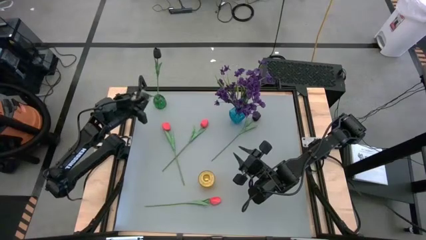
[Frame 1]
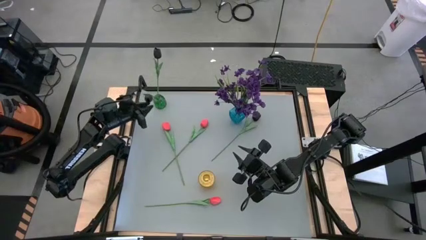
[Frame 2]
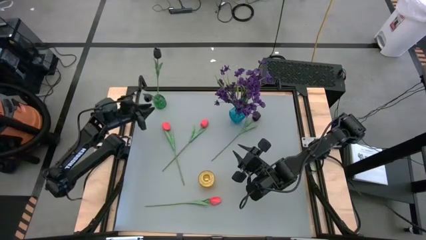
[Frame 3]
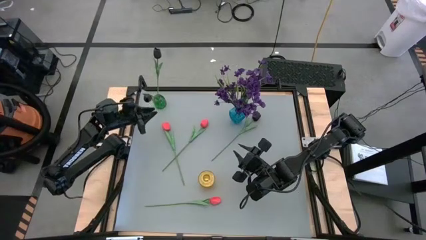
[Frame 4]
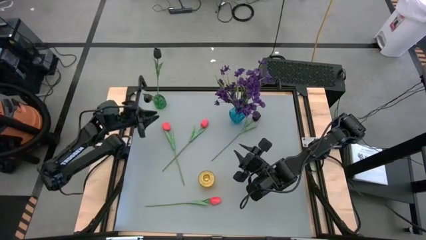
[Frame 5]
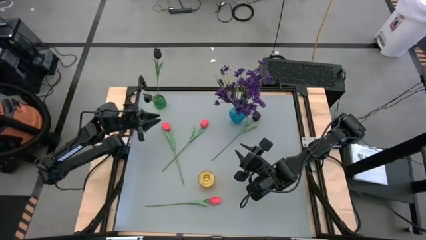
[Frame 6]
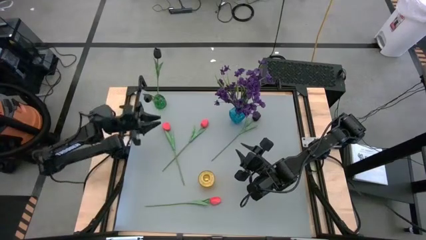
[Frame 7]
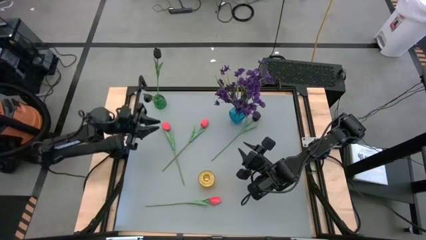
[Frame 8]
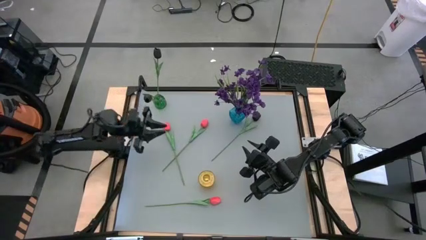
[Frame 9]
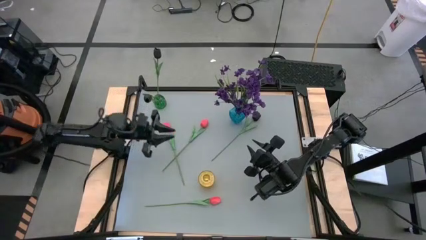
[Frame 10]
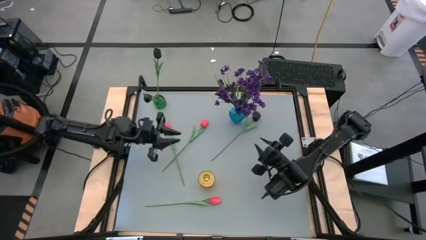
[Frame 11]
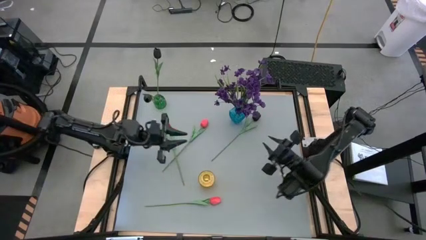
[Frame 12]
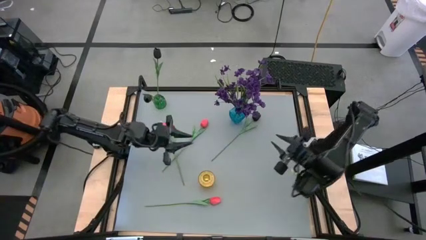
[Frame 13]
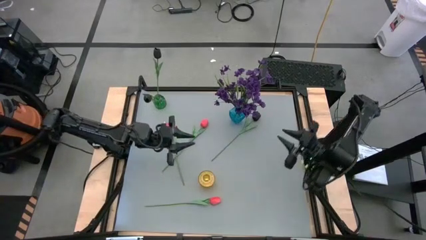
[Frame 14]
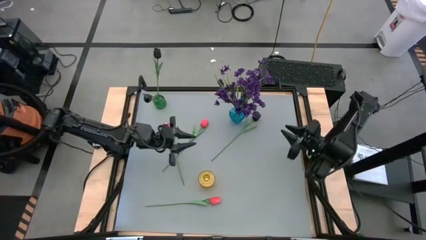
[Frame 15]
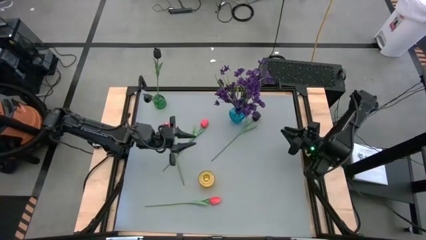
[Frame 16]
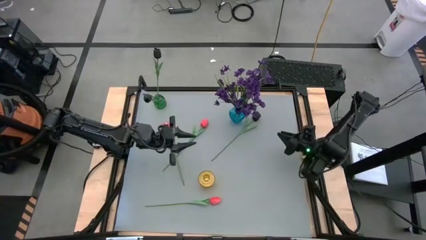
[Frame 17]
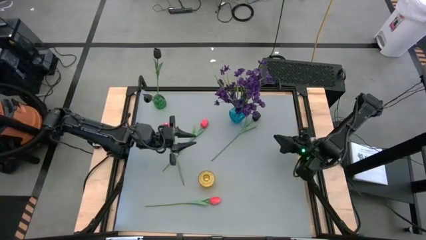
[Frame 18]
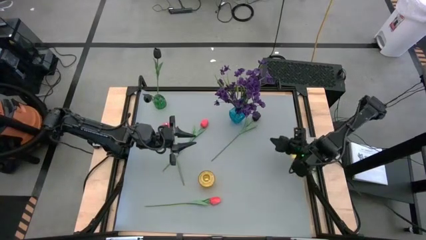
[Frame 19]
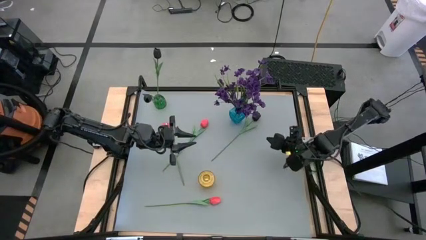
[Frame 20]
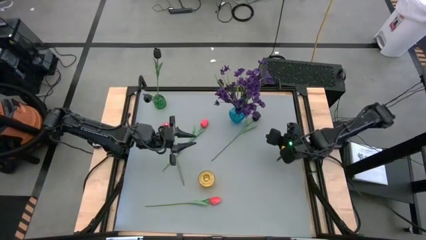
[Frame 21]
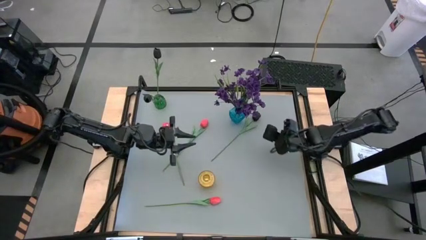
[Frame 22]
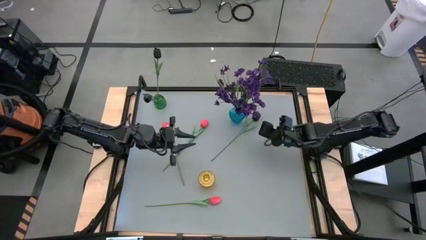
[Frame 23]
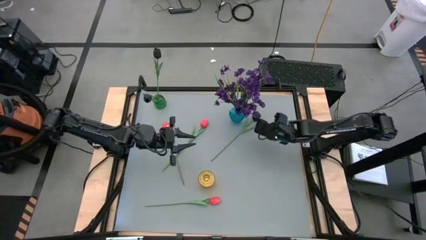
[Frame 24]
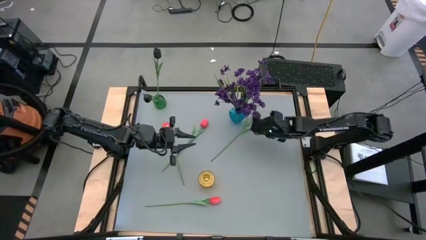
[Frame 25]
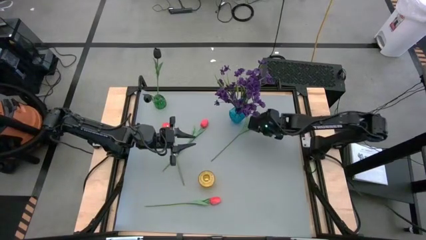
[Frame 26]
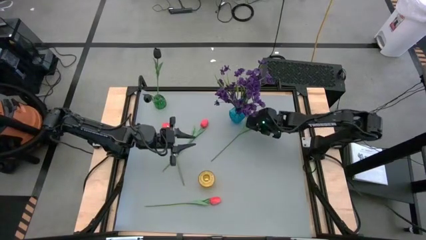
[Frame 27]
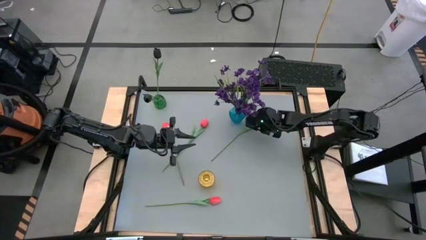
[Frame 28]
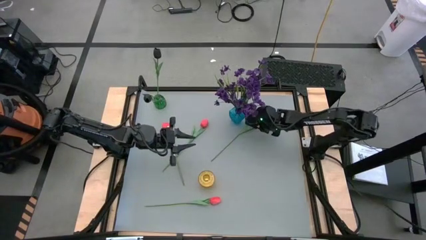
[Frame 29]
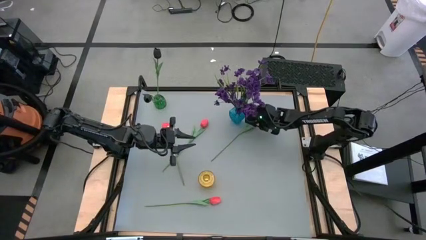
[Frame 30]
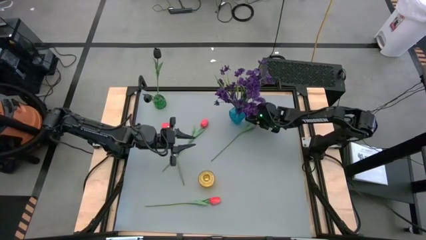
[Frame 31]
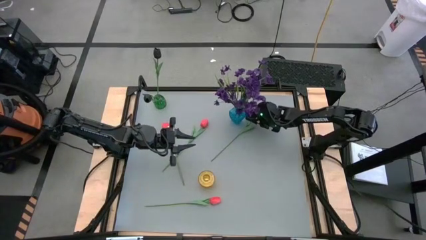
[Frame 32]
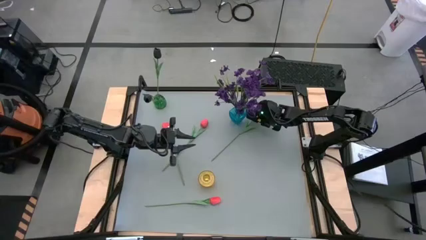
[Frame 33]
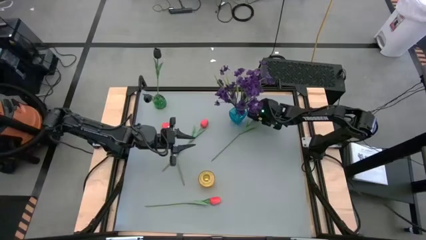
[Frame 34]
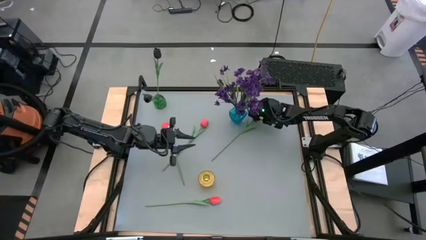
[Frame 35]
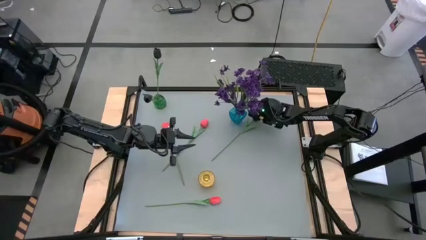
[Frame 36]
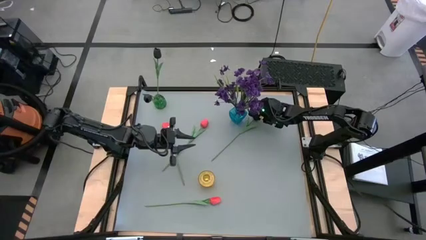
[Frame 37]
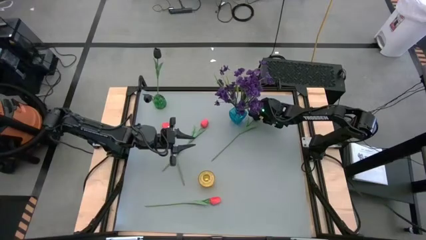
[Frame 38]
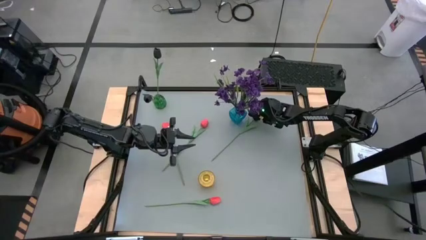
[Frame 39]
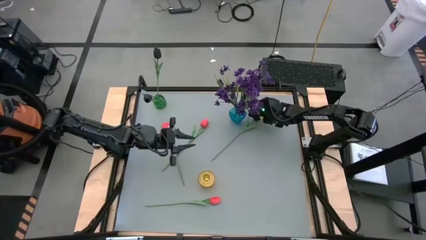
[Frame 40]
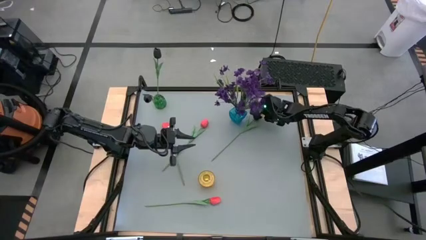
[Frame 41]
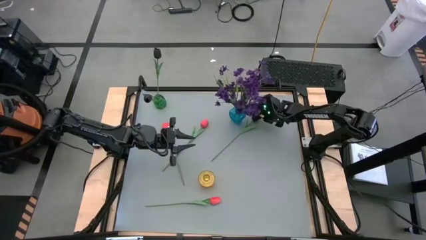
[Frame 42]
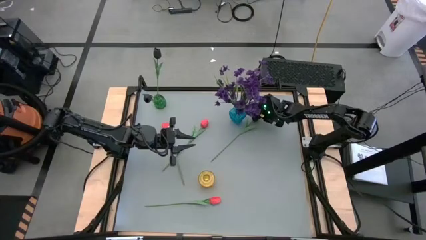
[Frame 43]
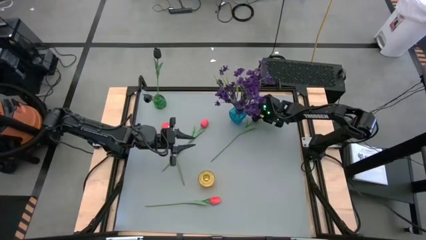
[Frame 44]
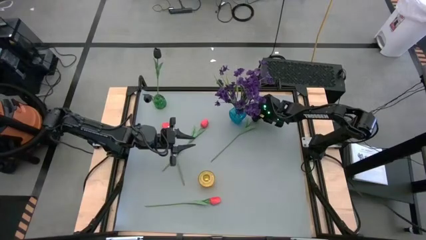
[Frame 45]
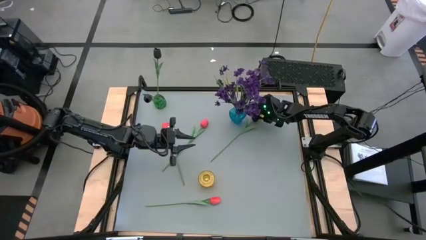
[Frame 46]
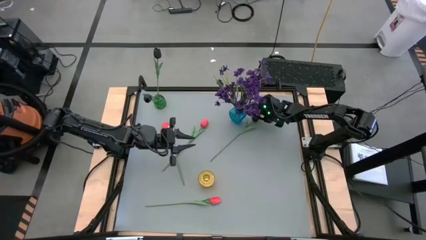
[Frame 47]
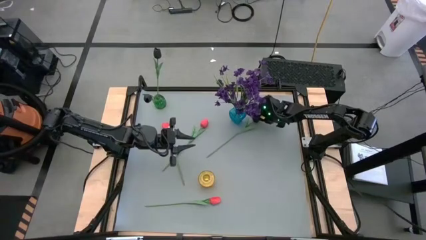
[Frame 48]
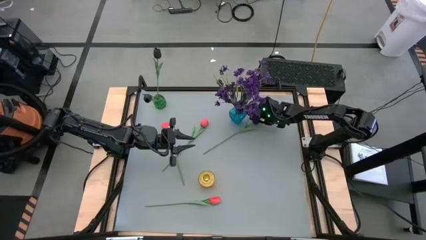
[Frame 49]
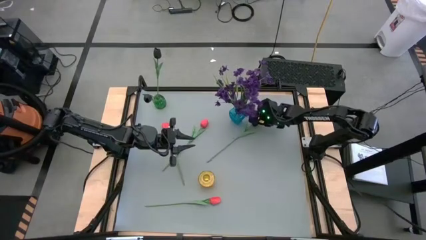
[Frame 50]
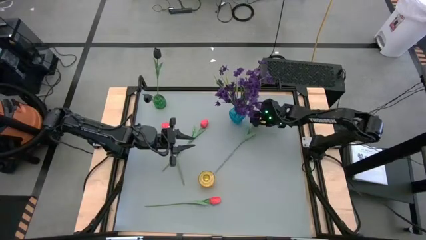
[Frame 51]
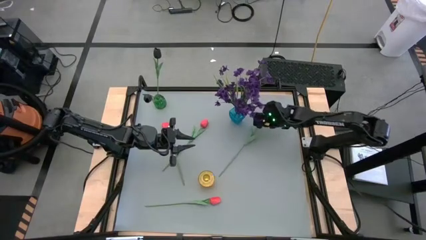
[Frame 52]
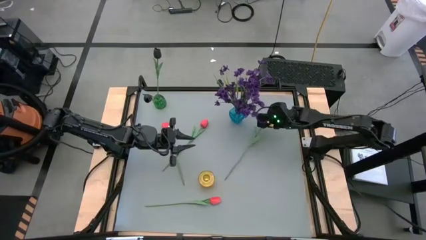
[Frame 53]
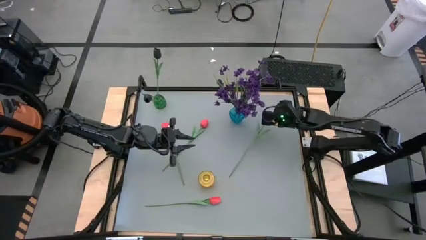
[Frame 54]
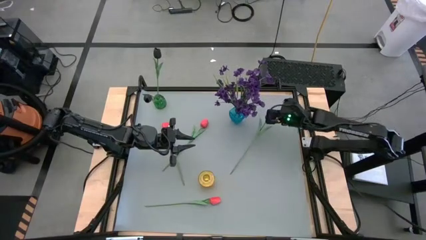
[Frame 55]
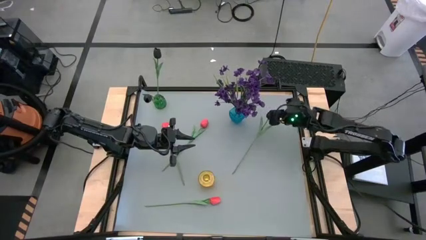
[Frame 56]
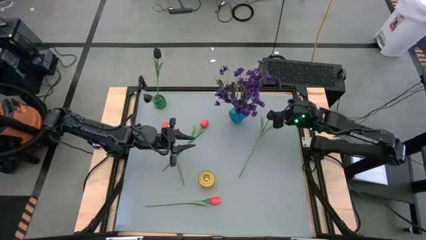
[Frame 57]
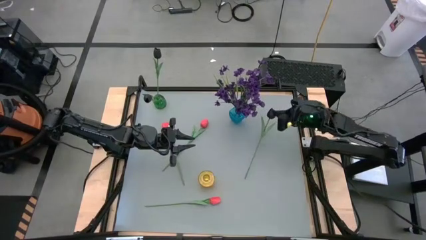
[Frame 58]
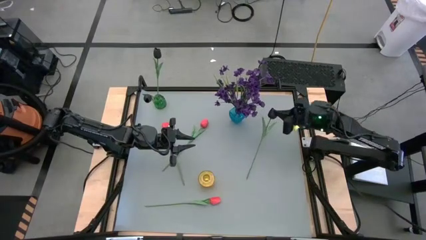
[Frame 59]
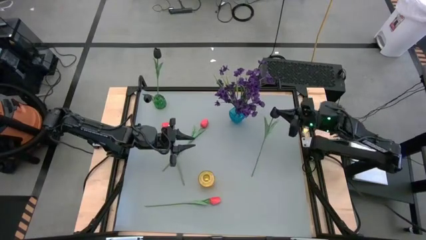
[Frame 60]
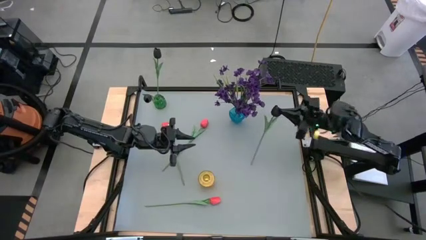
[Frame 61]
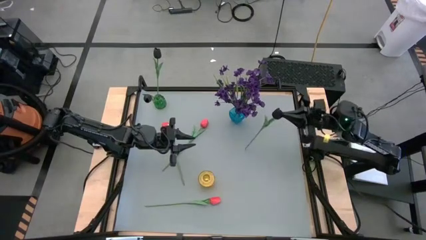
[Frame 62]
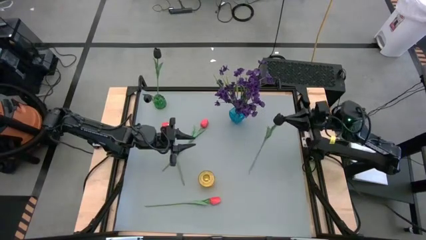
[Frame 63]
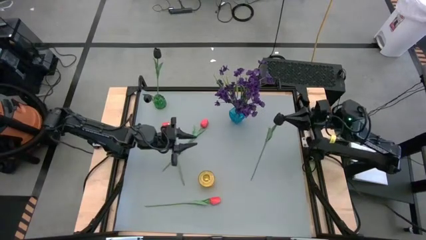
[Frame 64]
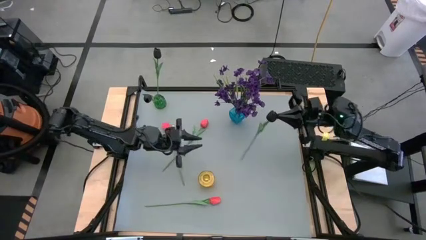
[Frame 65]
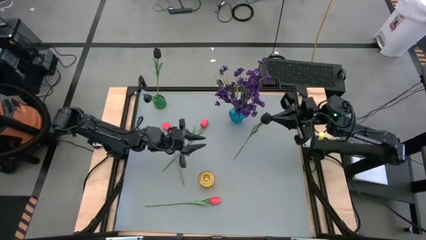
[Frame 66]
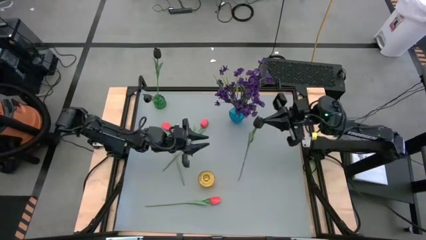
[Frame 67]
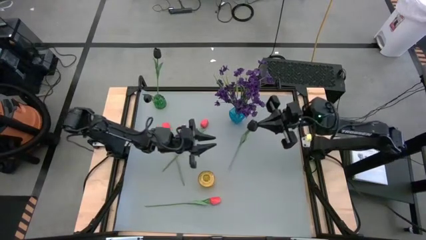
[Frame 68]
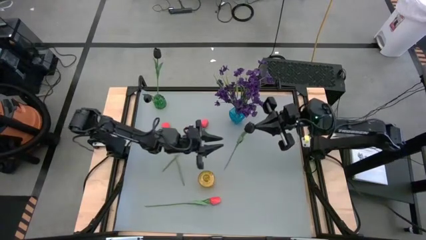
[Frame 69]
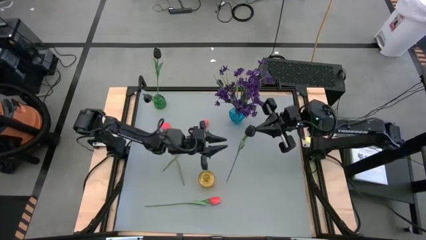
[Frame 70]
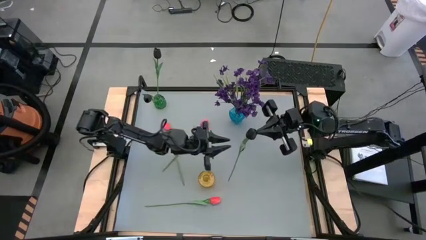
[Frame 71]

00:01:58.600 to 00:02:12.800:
Task: Sort flowers into vase by color
Put the black flower into the green vase

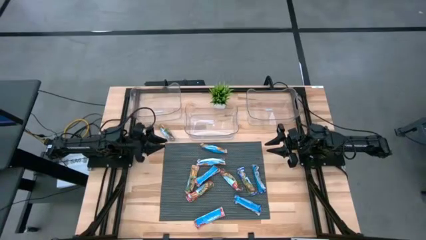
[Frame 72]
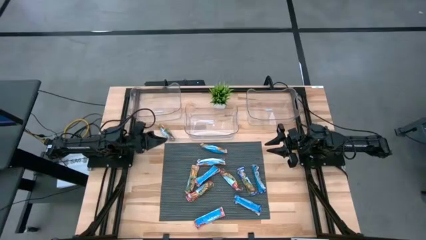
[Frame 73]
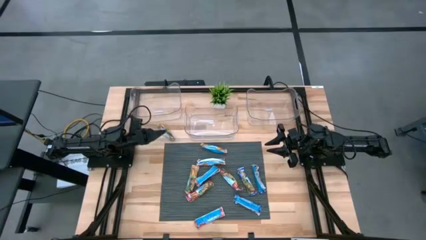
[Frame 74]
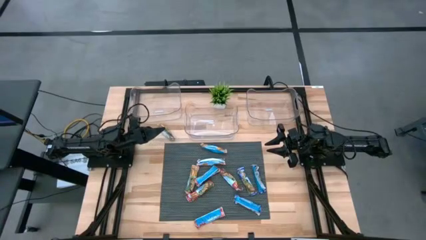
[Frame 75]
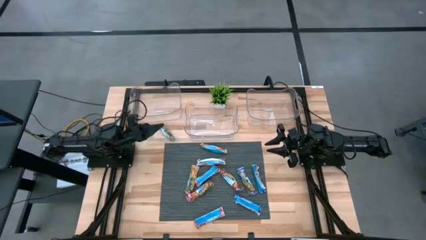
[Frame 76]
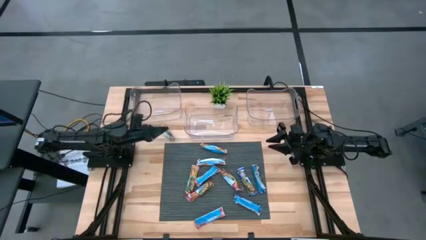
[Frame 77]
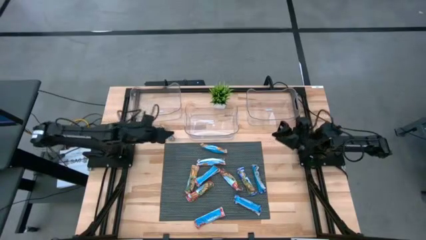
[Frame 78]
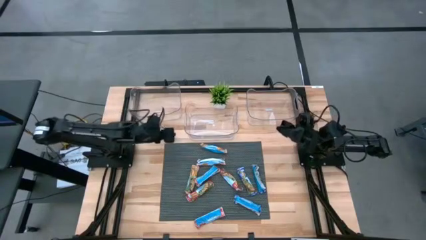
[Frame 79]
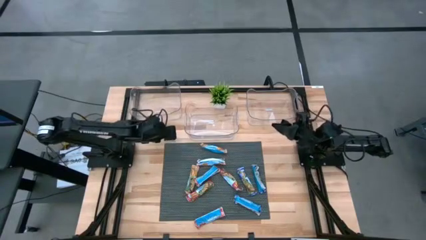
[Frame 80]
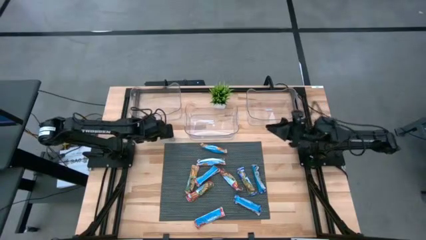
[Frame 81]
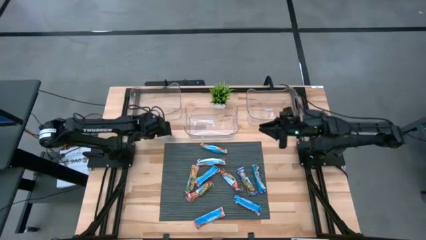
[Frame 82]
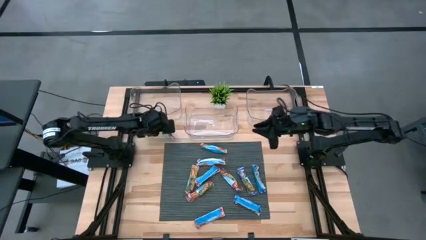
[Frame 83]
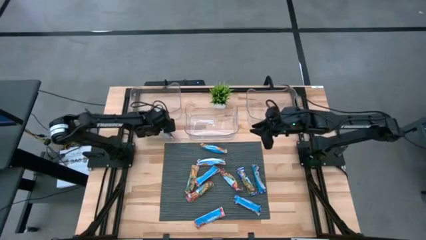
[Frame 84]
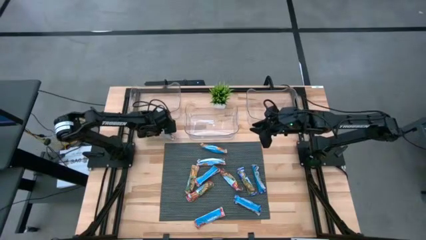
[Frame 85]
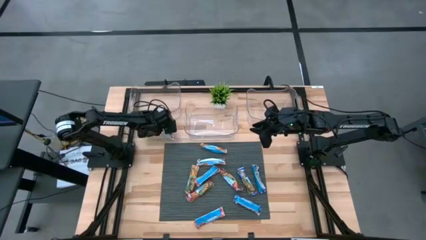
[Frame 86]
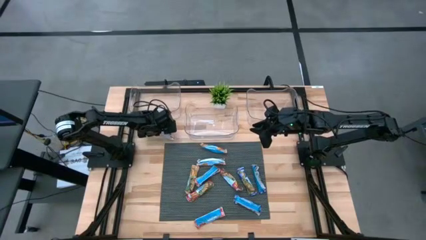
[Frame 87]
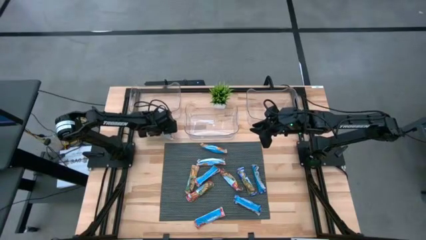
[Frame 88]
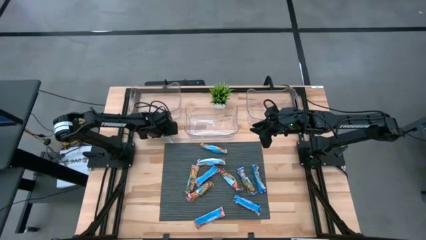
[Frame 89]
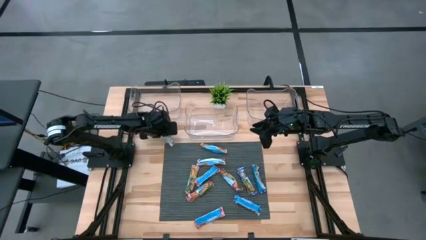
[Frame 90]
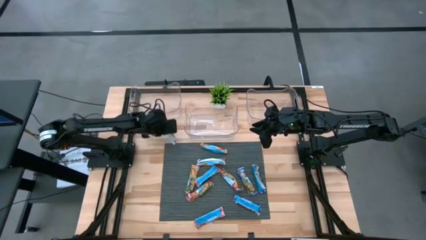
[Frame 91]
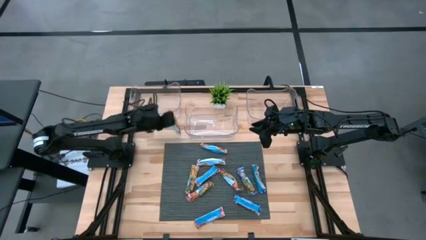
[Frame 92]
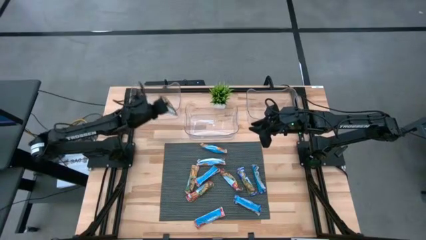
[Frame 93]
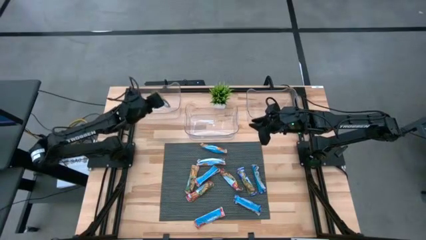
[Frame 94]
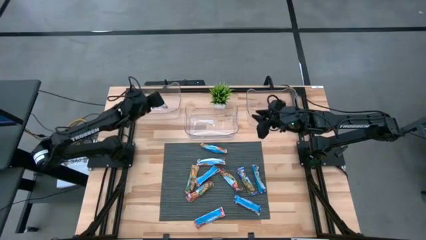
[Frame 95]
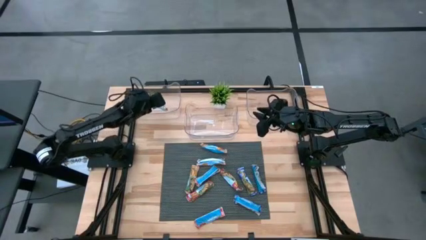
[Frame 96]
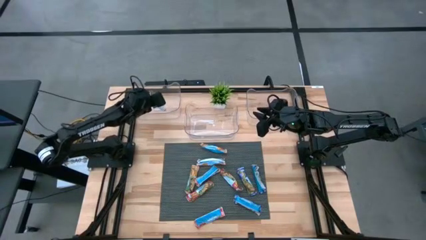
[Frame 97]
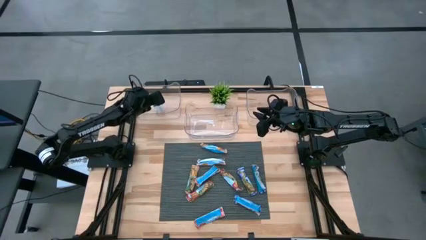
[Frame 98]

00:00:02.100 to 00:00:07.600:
Task: Pick and place Granola Bars by type
Put the green granola bar into the left transparent bin
